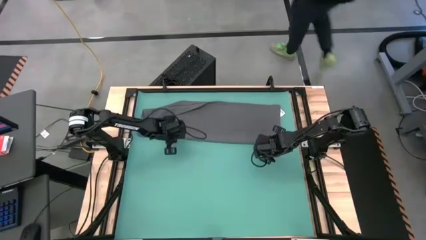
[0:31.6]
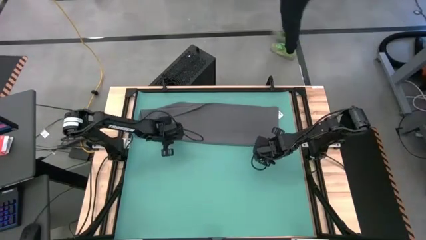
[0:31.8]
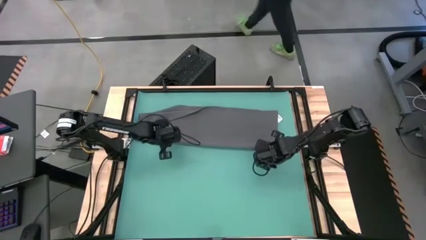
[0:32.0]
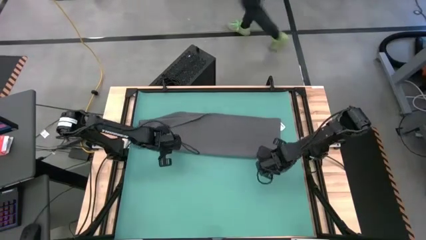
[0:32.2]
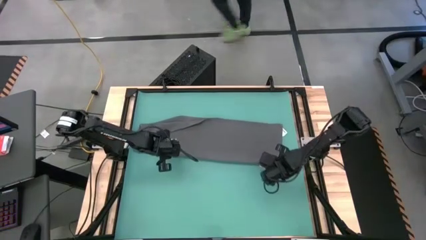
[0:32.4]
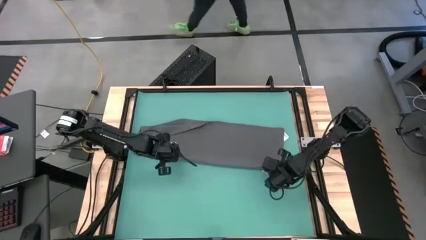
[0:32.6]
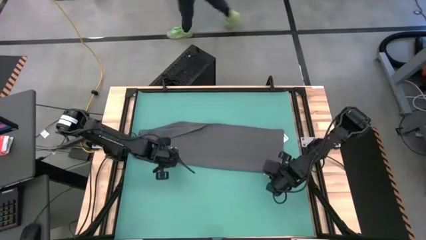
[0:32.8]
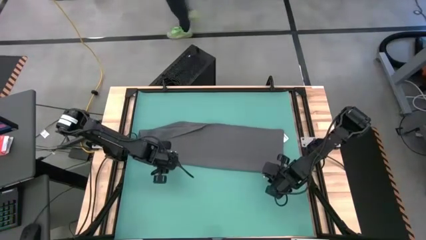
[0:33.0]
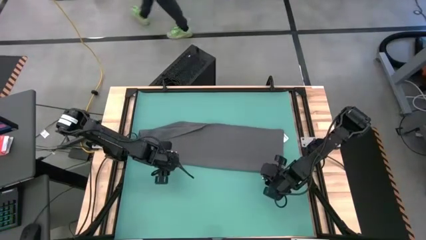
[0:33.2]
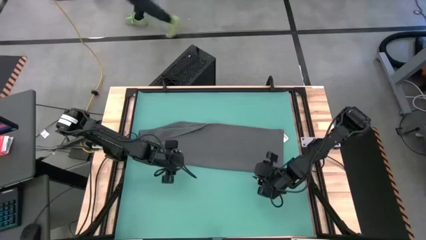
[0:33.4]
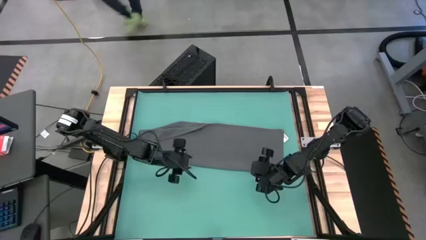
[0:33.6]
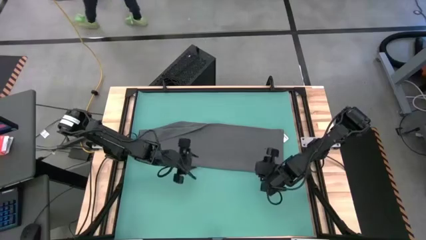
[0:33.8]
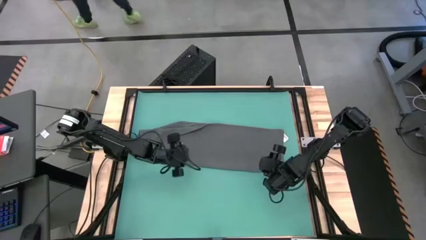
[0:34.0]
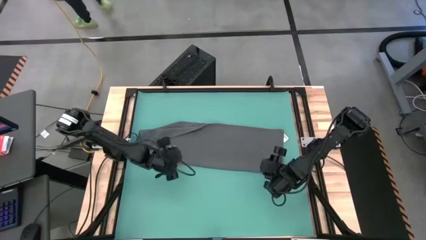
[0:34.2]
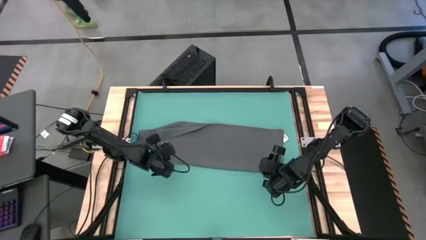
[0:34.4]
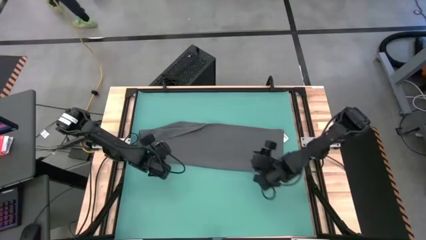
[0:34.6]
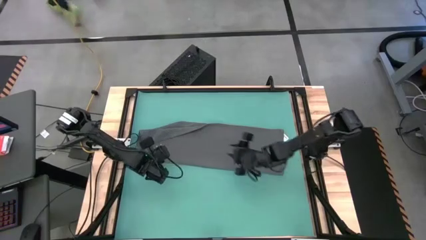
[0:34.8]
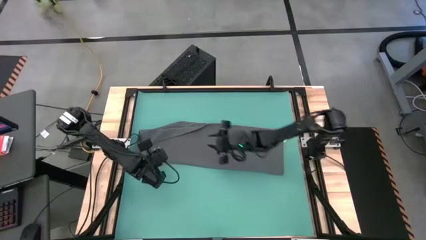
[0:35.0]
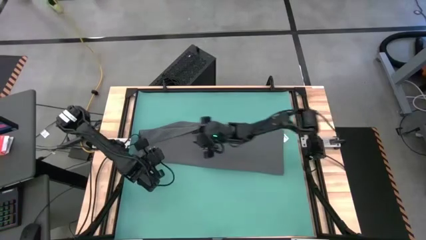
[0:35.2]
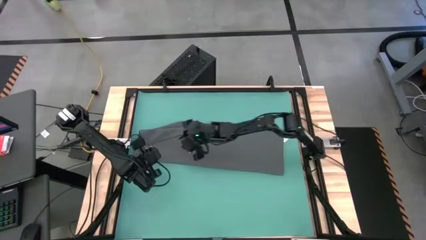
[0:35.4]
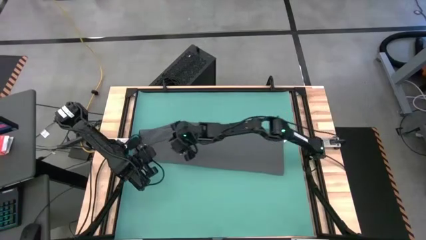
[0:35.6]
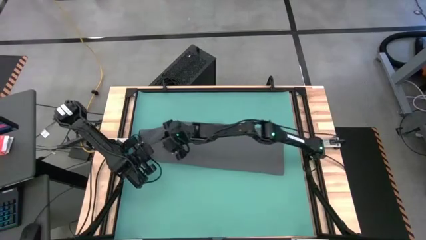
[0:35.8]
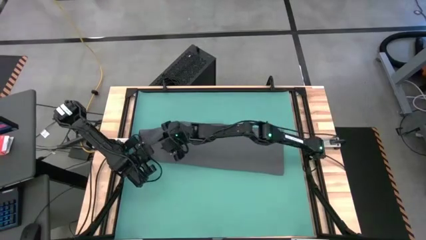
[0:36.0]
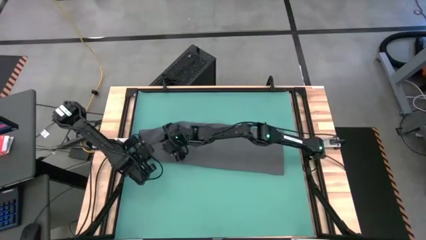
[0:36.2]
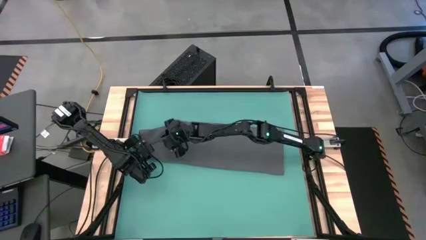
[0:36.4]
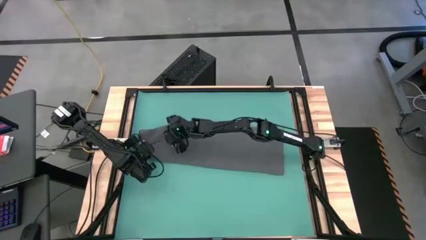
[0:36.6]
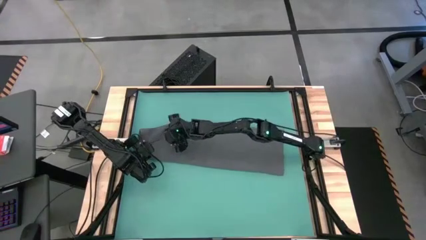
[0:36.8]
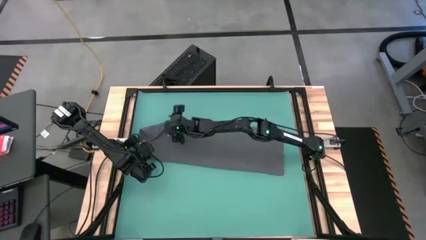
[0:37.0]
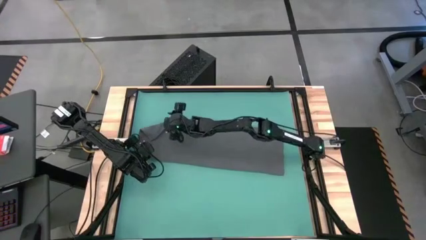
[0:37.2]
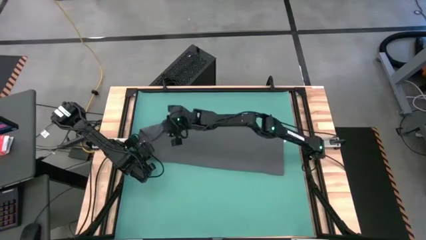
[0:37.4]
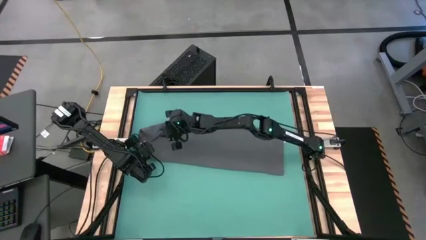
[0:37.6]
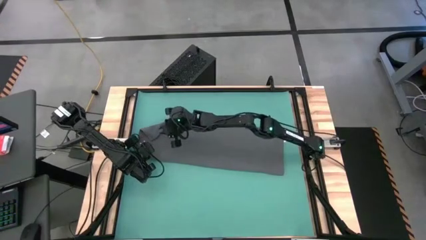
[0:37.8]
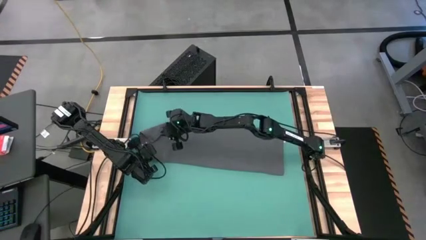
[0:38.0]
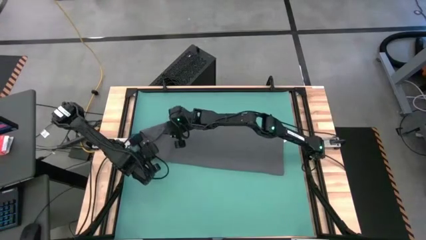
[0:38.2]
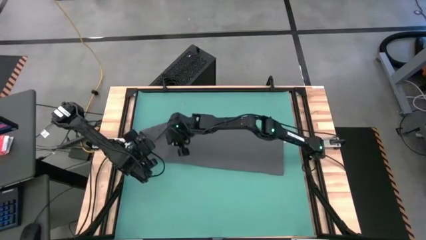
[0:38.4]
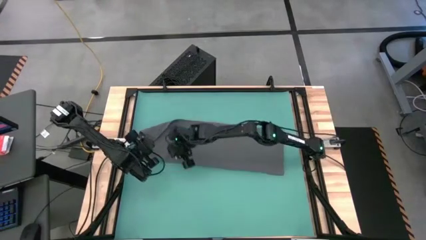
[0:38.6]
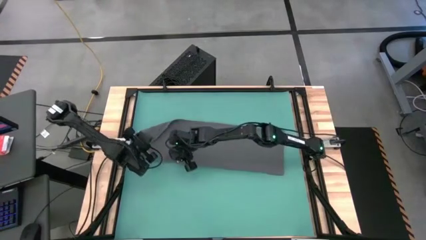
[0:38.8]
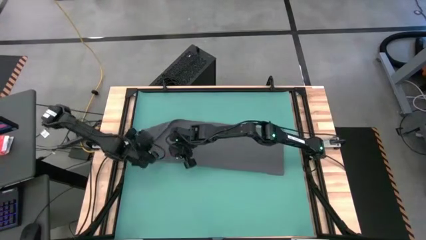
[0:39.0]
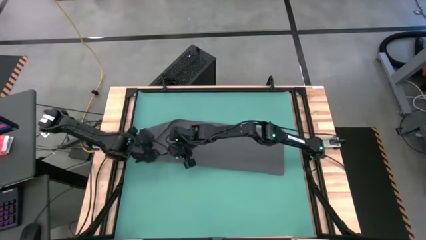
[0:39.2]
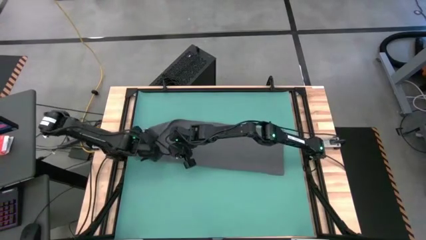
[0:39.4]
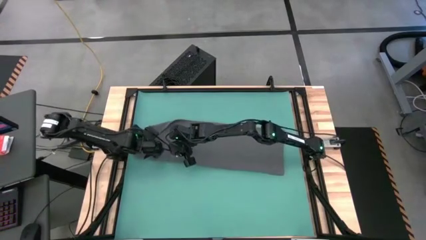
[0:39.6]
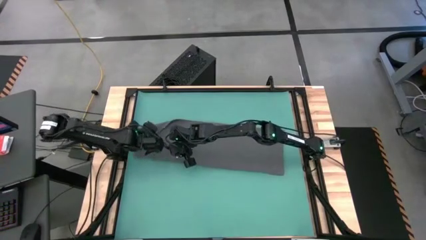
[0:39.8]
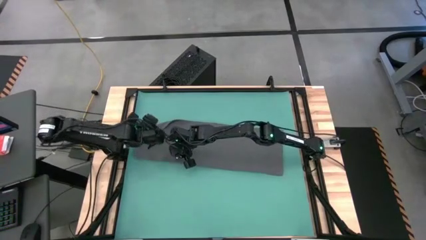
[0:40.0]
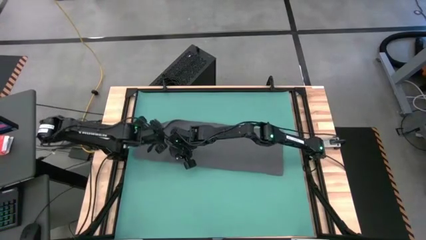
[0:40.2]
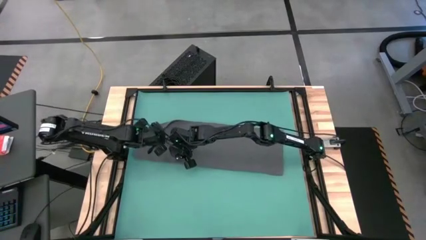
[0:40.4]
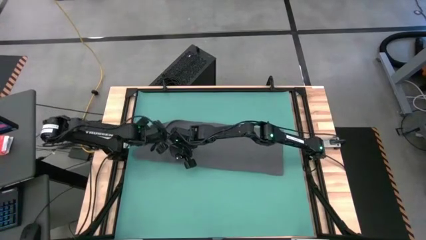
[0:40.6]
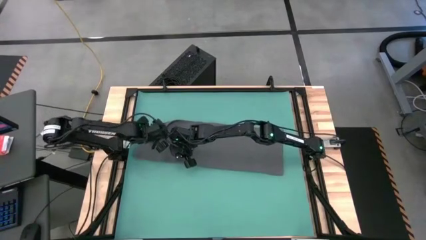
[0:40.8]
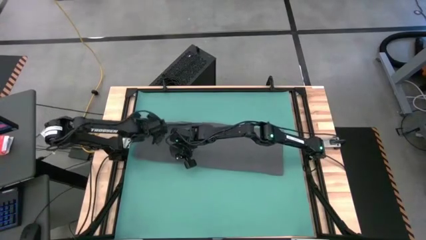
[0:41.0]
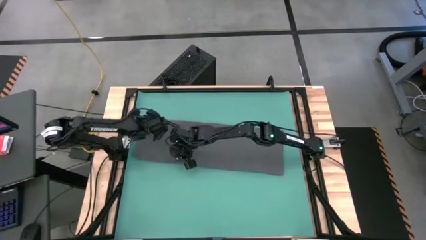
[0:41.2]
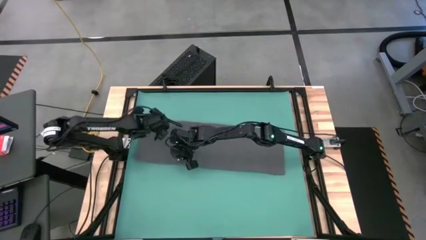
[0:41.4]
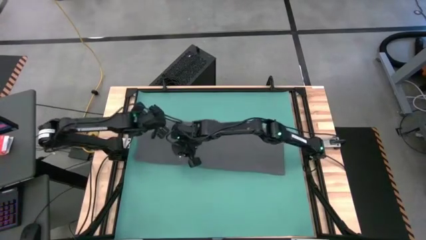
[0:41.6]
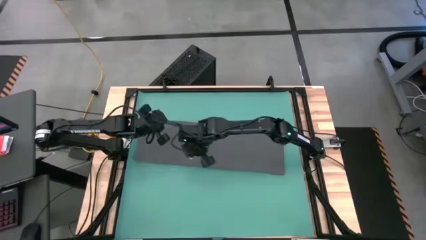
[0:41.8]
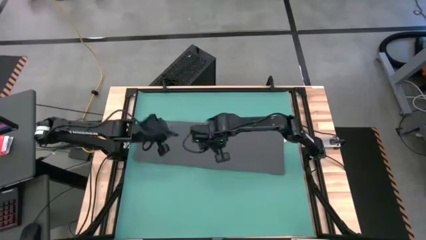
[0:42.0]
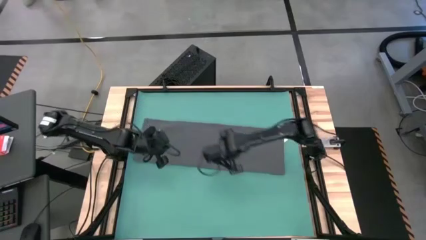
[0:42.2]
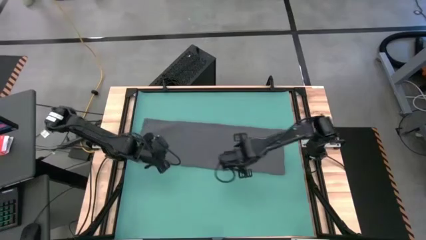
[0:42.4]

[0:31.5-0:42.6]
Task: Roll towel
Roll the gray towel
